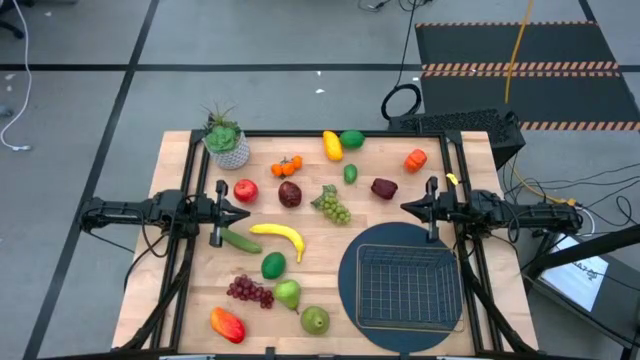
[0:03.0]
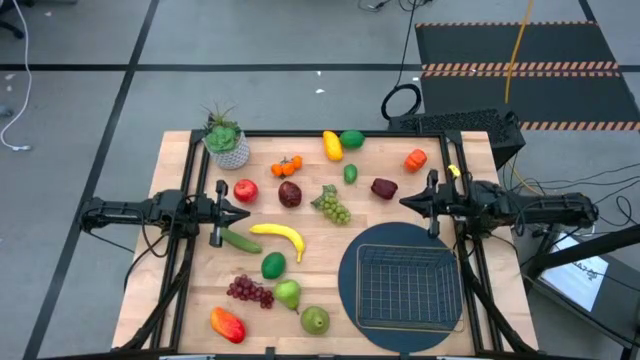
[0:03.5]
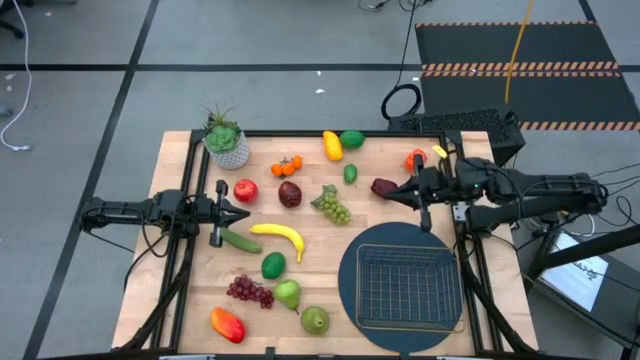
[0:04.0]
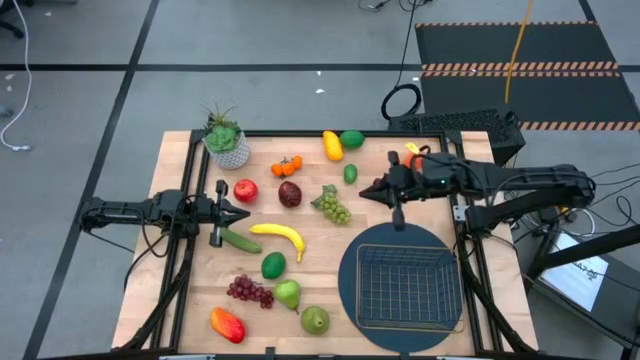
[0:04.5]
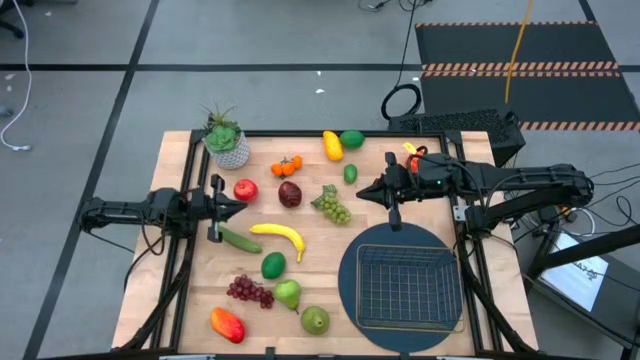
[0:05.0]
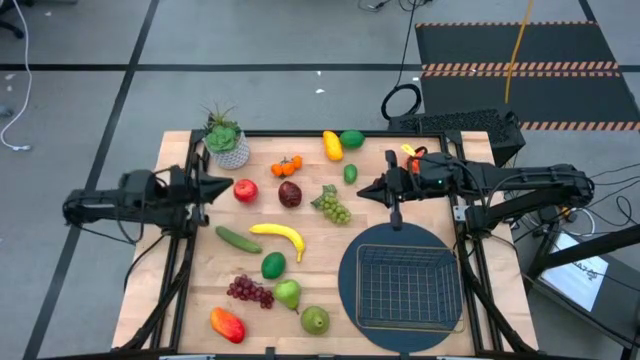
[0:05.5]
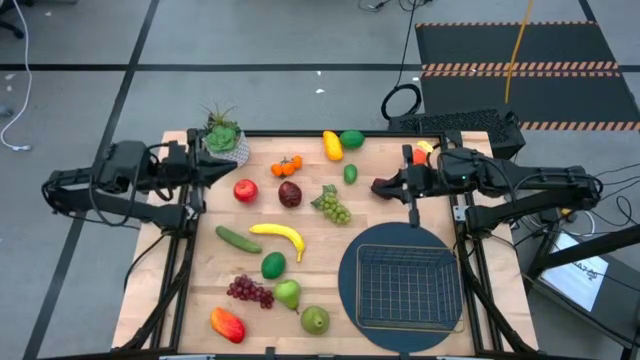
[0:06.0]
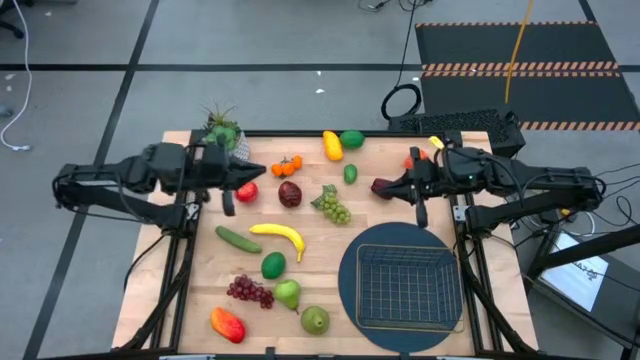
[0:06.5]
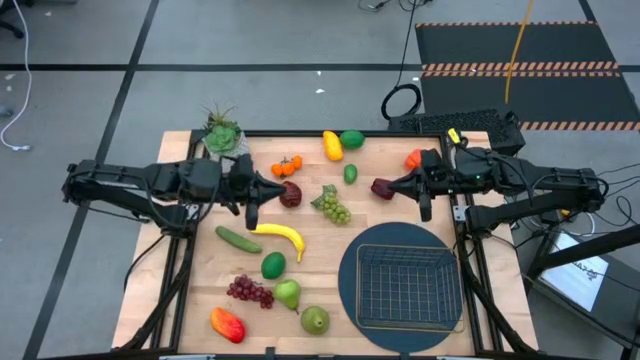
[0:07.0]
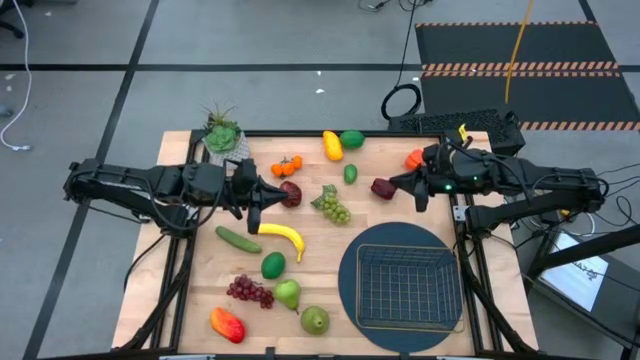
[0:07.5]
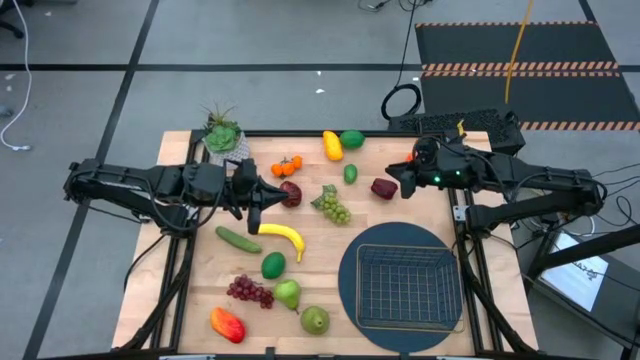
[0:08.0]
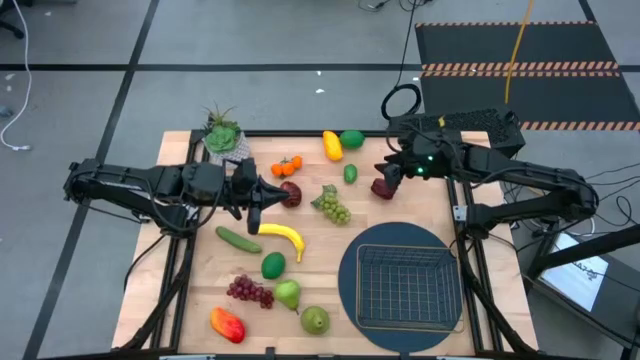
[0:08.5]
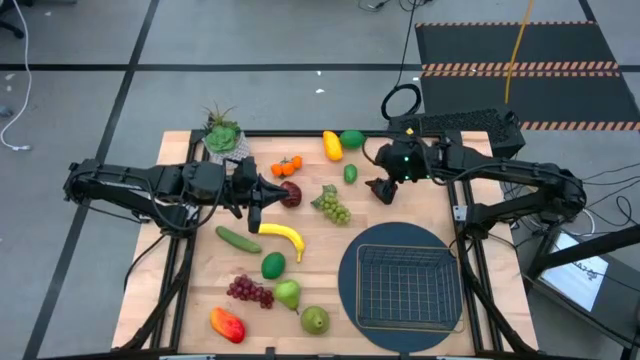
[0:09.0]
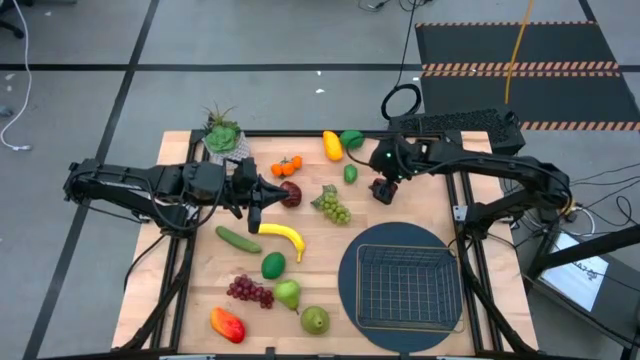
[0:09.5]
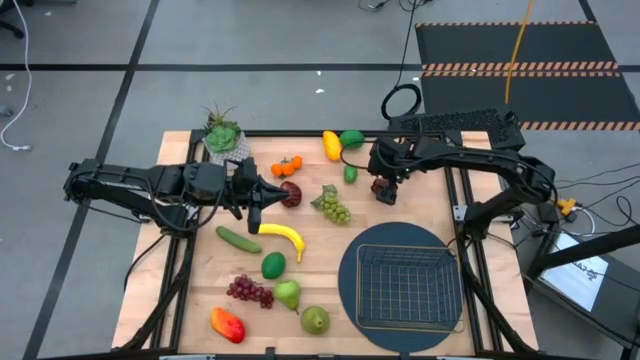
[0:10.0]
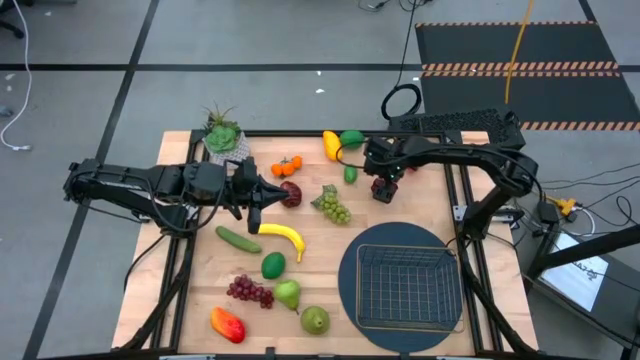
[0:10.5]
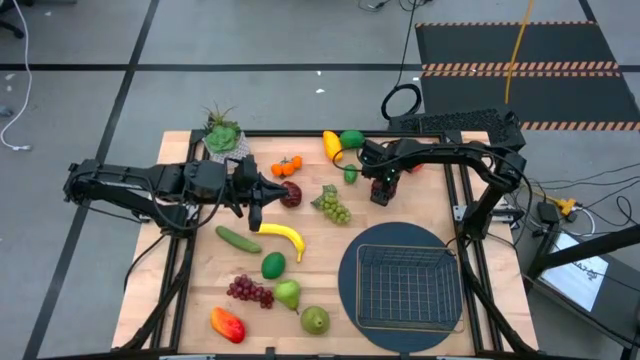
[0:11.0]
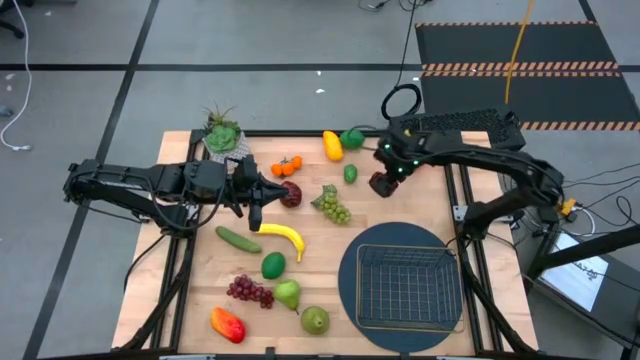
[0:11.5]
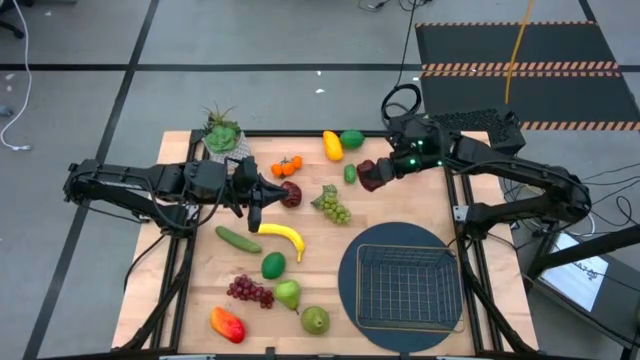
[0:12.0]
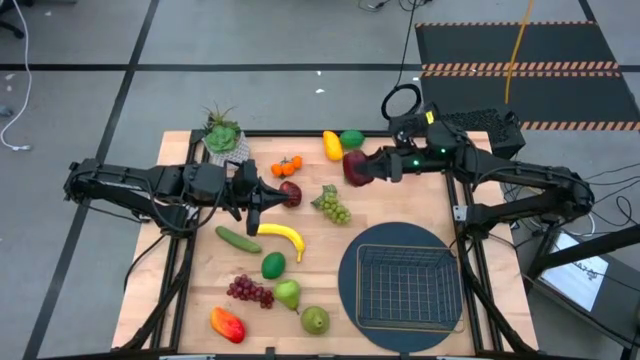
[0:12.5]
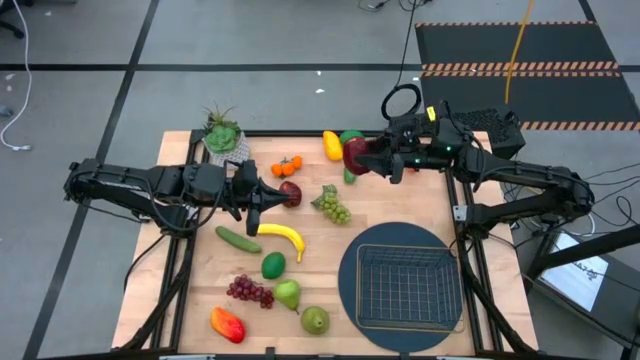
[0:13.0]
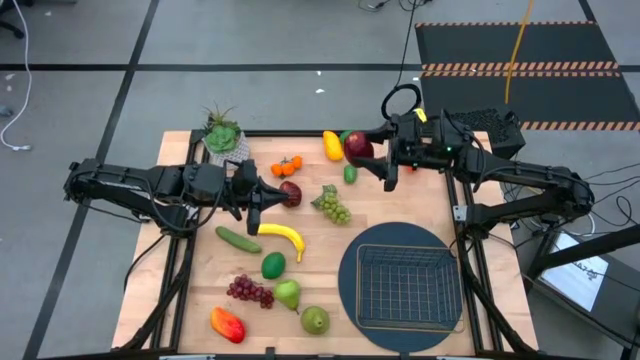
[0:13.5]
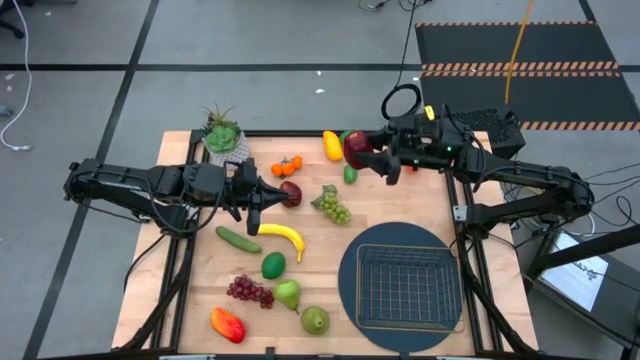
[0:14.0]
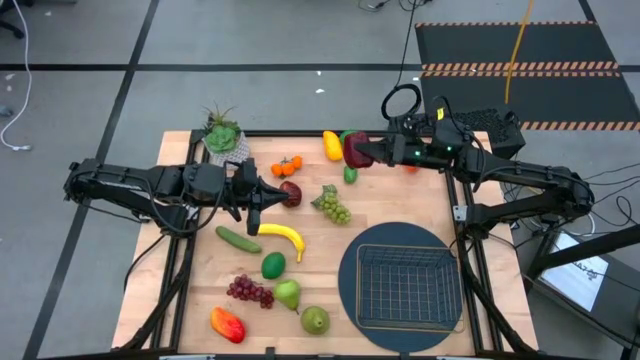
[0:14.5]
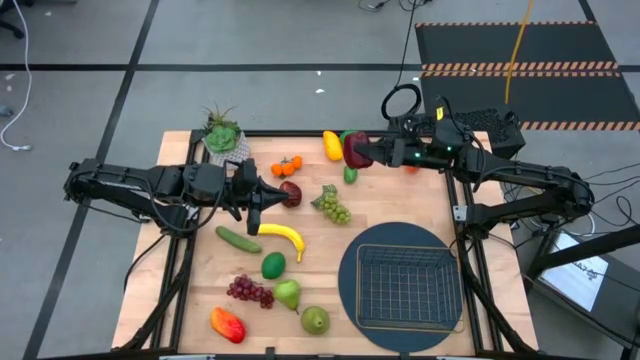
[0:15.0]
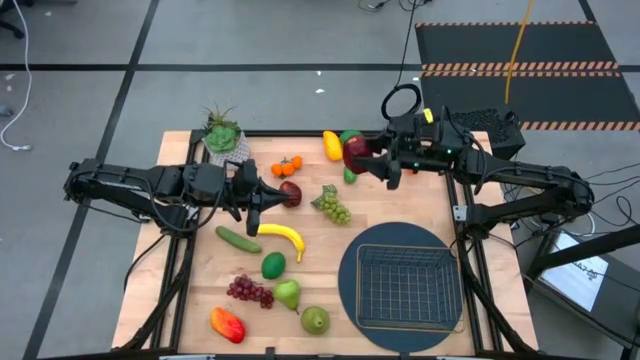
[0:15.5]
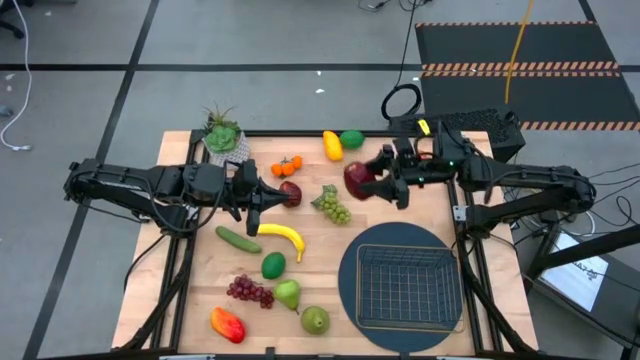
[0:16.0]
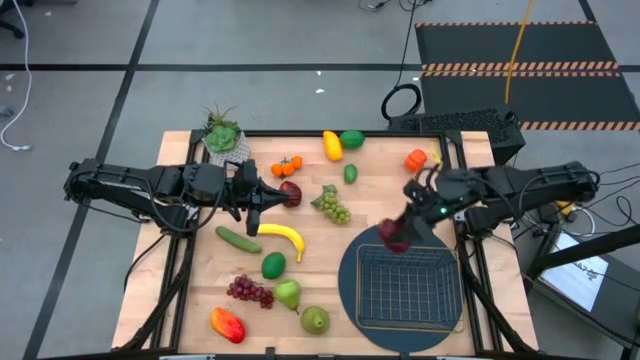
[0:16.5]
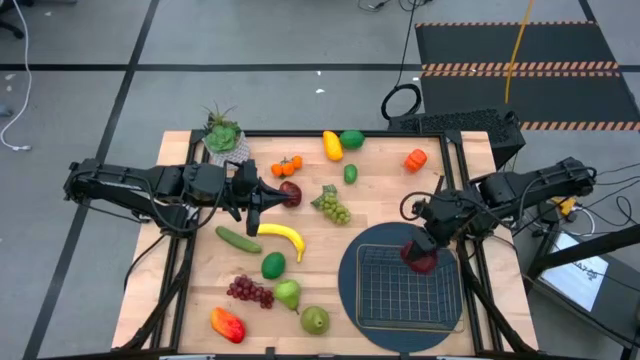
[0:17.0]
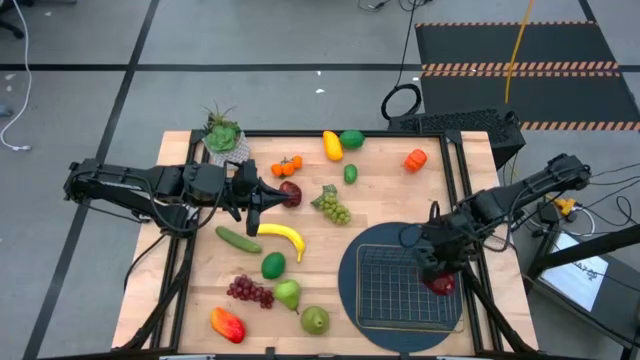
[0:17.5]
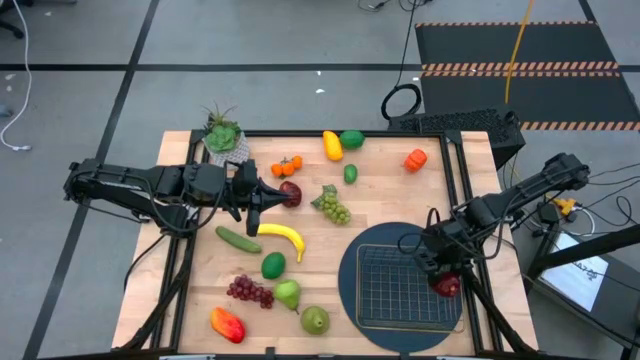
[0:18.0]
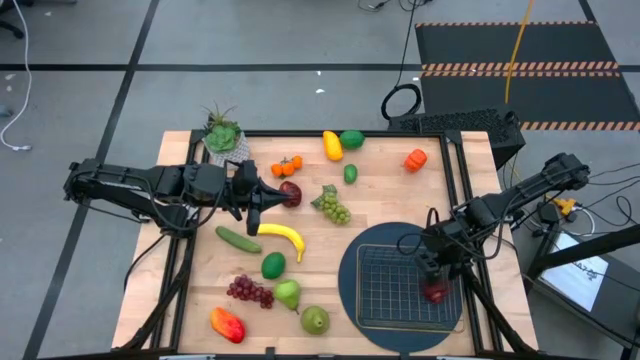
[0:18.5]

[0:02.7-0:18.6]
Task: Build produce basket
Put the right apple into the gold wire basket

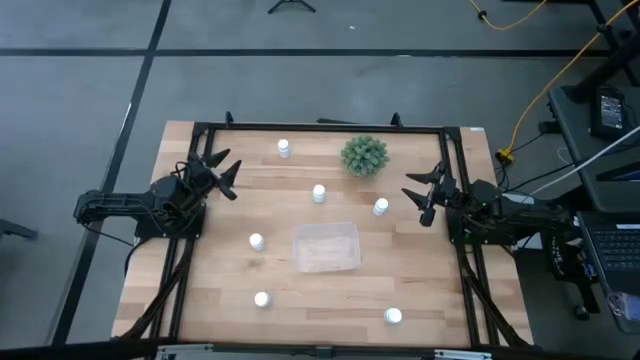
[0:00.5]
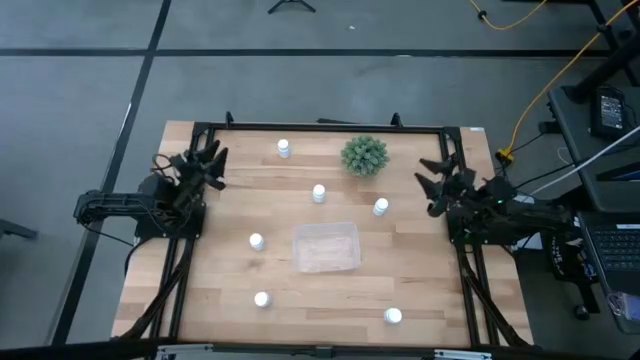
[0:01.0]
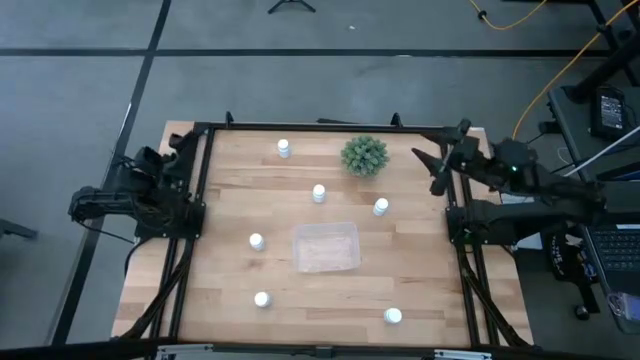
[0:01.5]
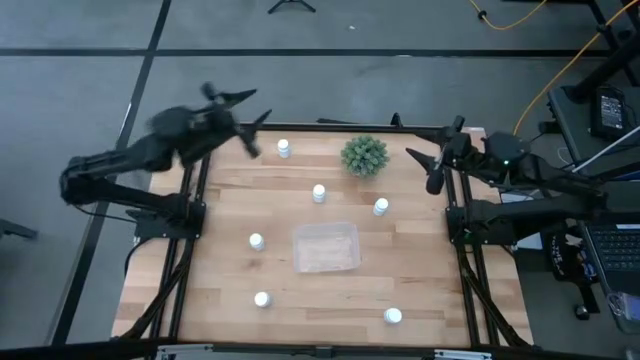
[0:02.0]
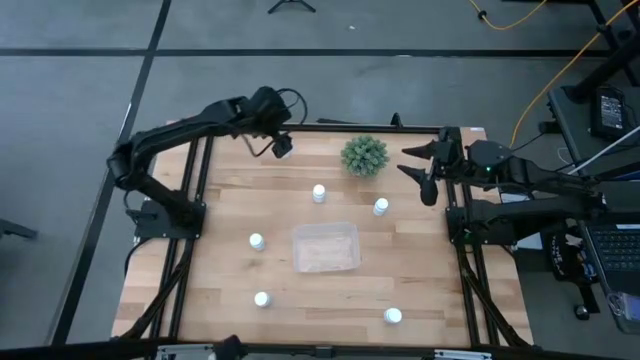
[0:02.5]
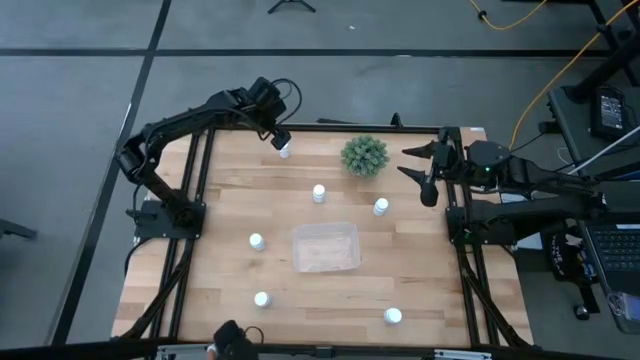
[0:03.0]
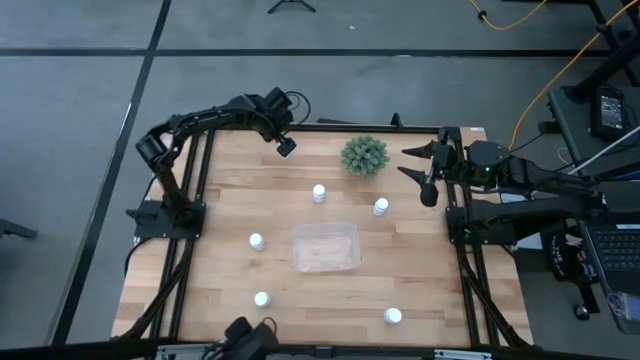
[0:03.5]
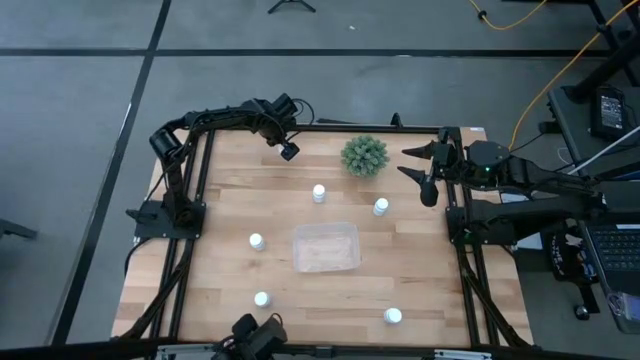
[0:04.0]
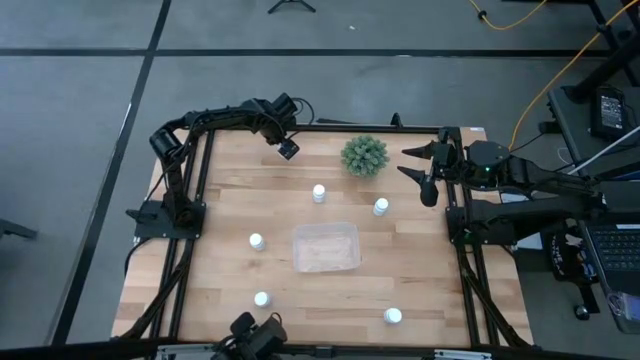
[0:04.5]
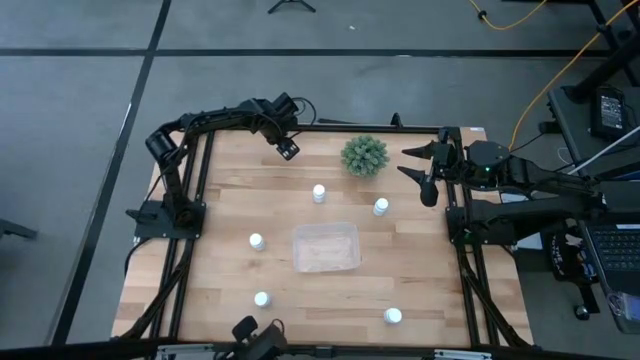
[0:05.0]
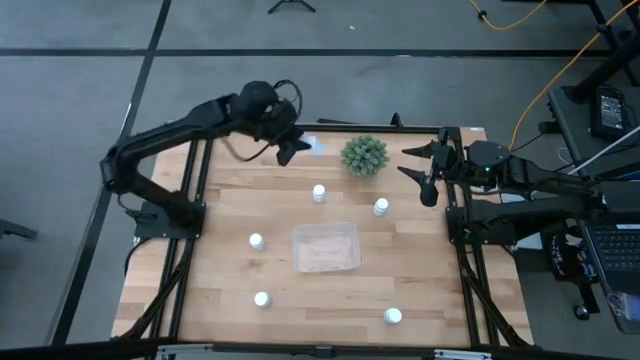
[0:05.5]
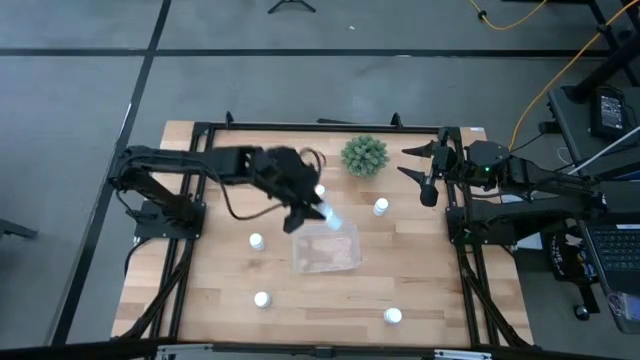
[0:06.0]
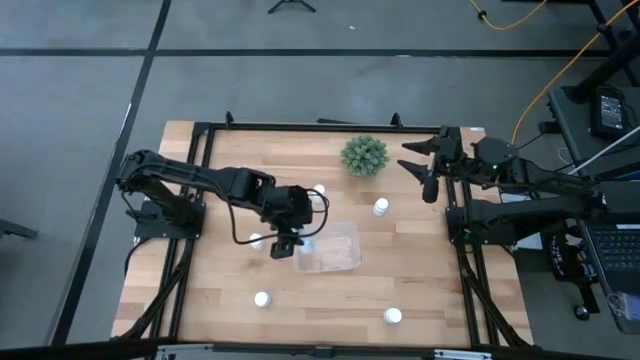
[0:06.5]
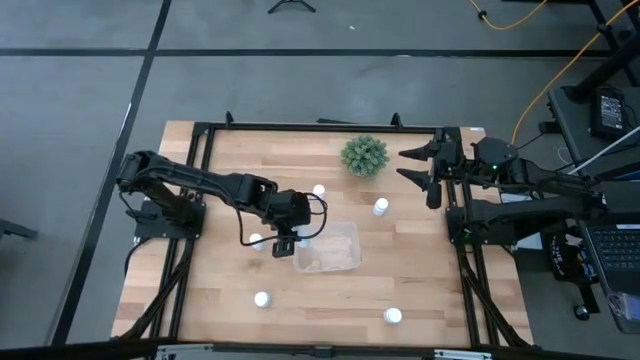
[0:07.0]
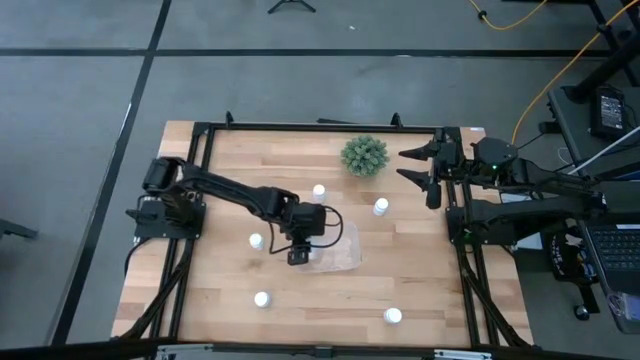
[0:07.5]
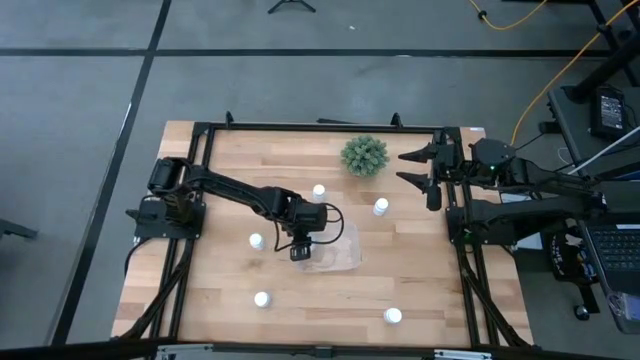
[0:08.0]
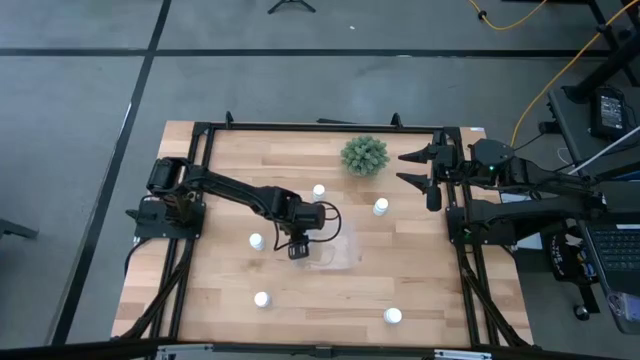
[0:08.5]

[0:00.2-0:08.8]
Task: Pick and place pill bottles into a basket
Put the white medicine bottle into the transparent bin
